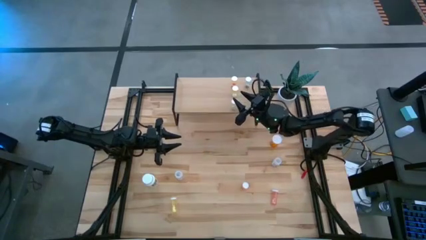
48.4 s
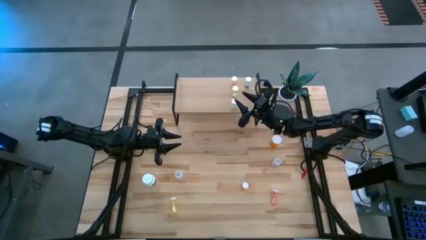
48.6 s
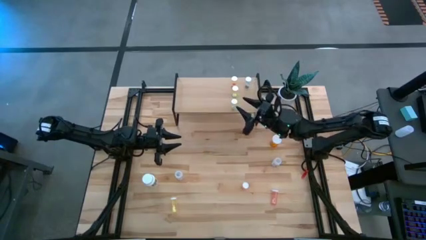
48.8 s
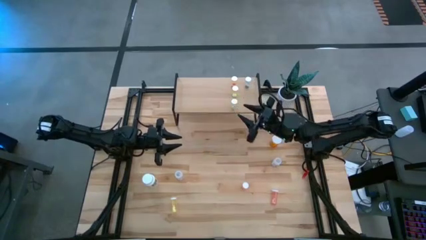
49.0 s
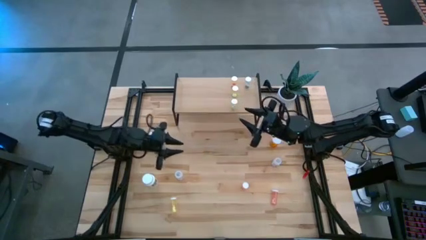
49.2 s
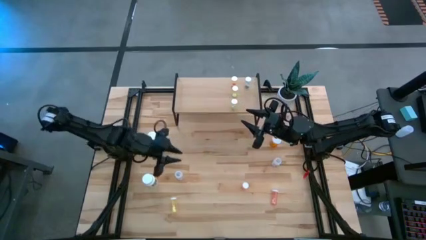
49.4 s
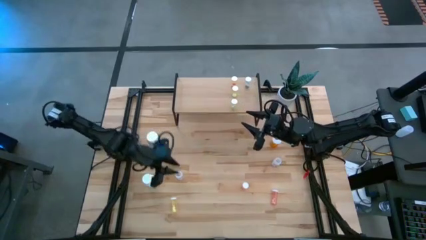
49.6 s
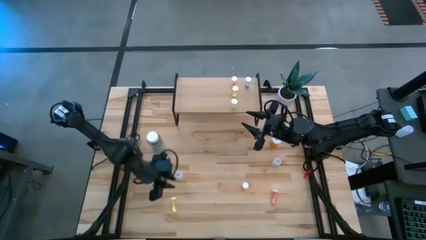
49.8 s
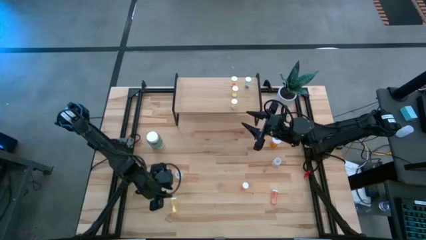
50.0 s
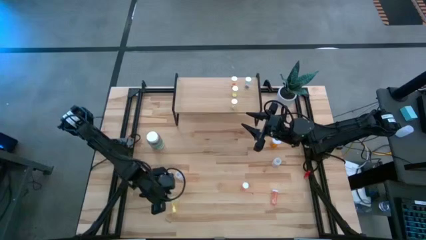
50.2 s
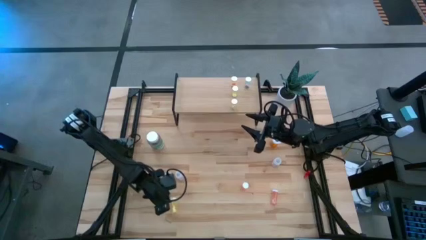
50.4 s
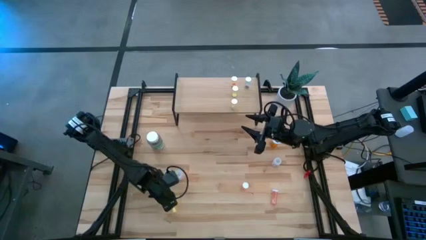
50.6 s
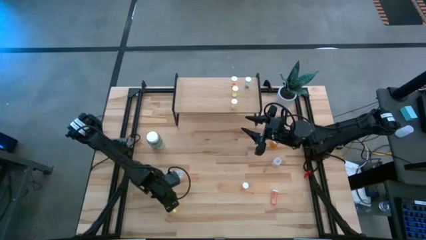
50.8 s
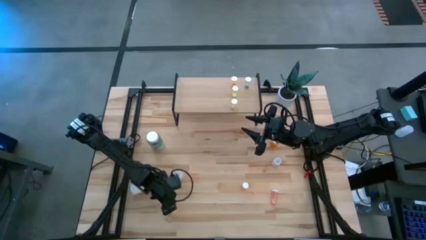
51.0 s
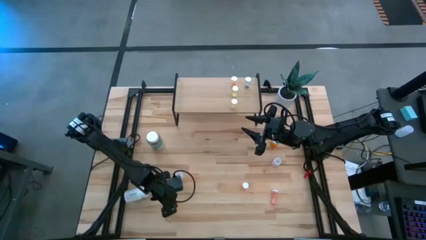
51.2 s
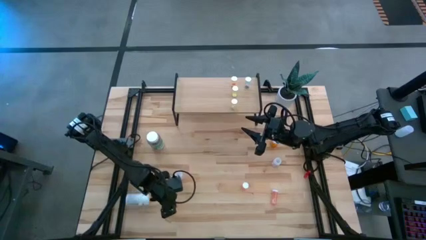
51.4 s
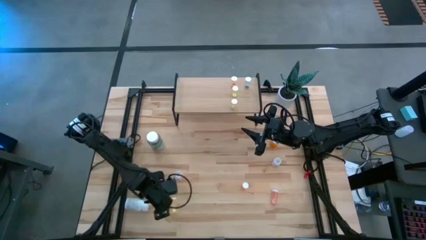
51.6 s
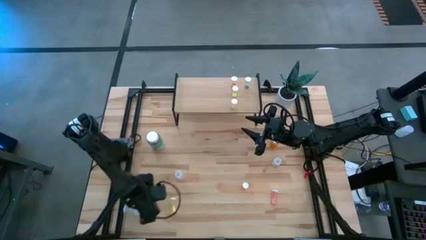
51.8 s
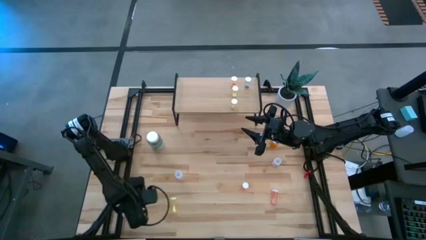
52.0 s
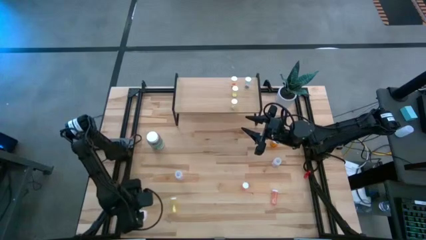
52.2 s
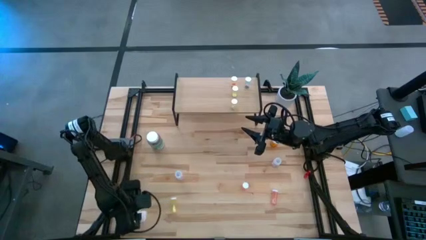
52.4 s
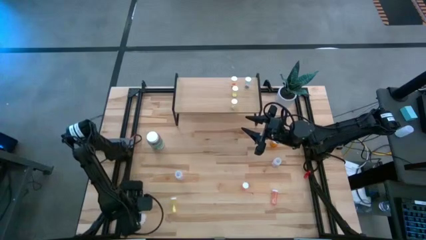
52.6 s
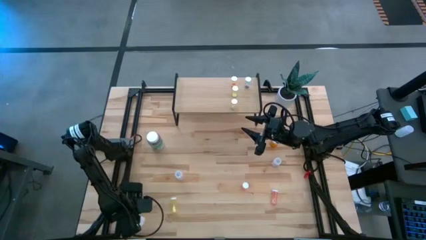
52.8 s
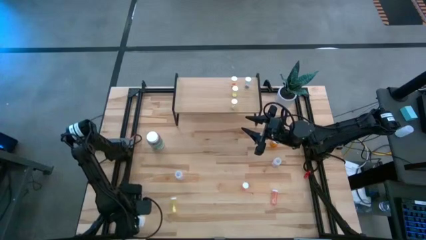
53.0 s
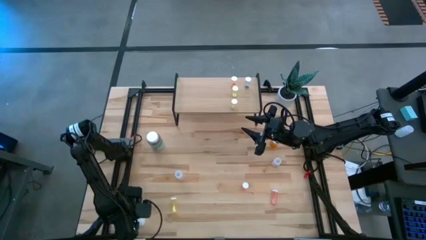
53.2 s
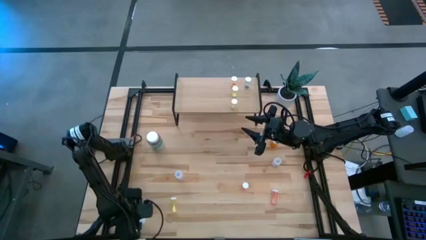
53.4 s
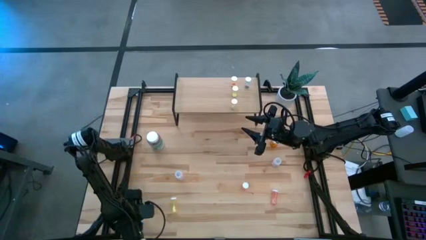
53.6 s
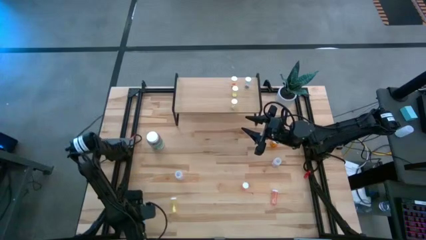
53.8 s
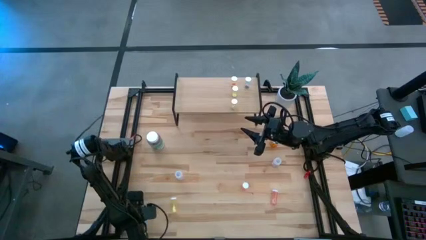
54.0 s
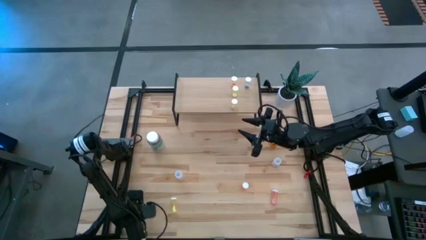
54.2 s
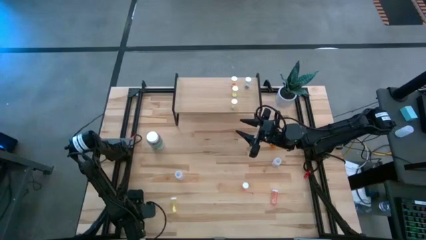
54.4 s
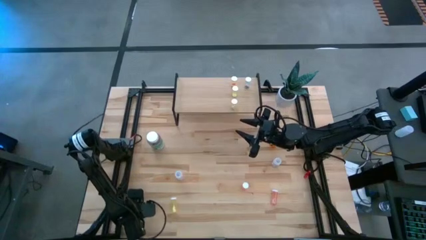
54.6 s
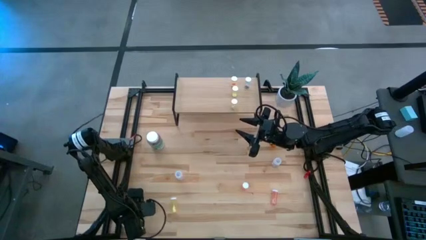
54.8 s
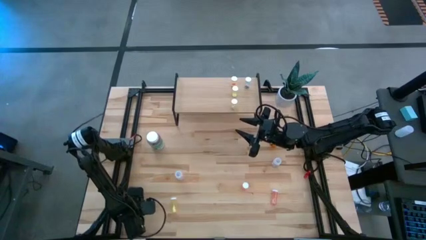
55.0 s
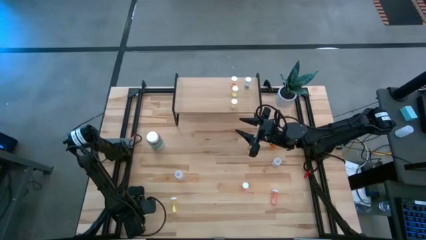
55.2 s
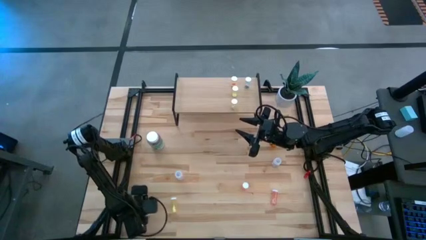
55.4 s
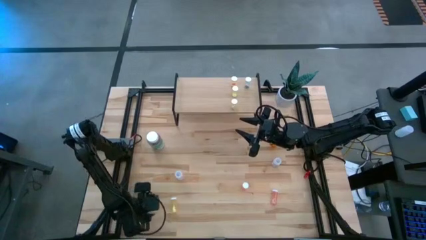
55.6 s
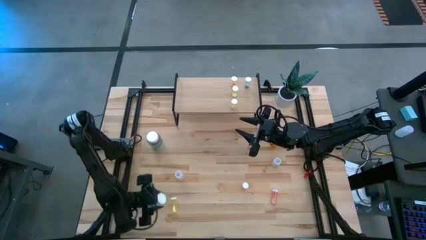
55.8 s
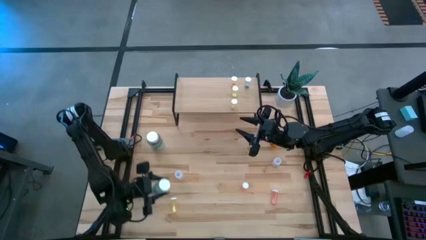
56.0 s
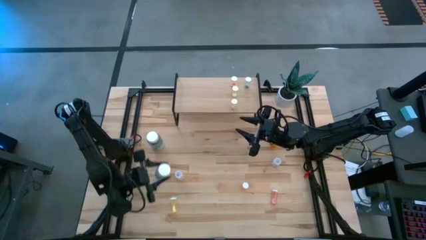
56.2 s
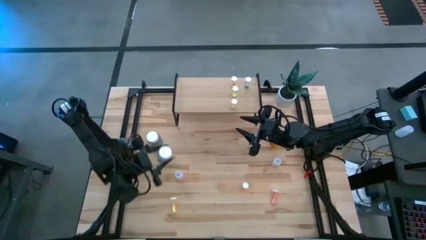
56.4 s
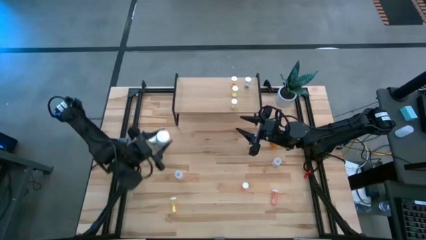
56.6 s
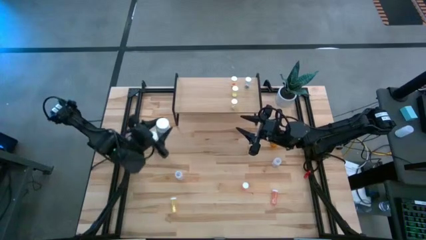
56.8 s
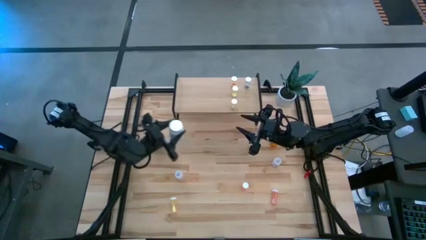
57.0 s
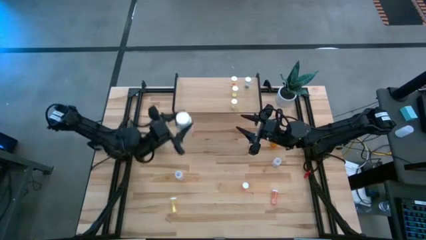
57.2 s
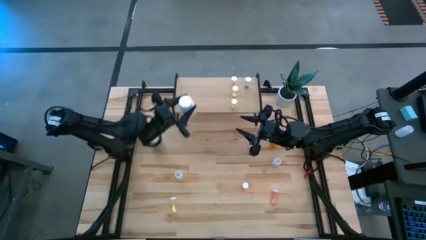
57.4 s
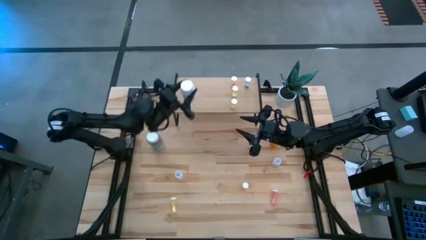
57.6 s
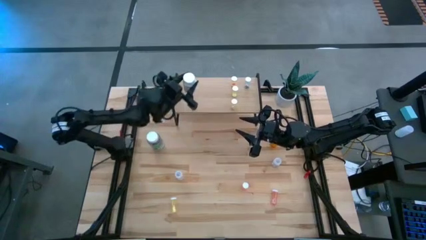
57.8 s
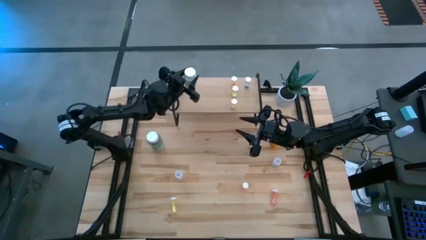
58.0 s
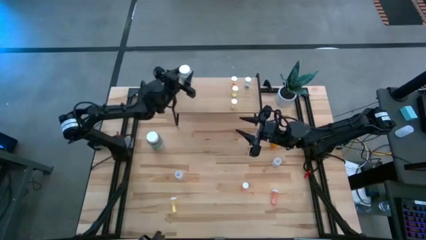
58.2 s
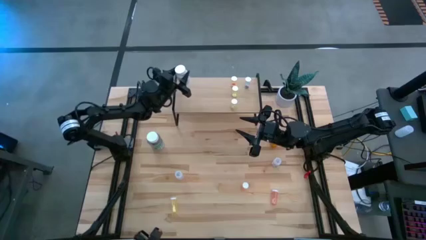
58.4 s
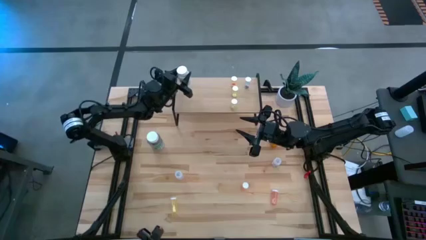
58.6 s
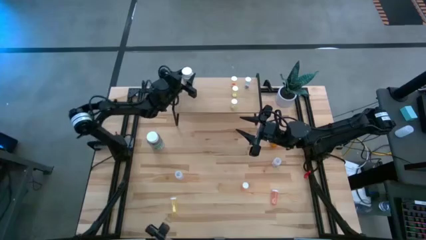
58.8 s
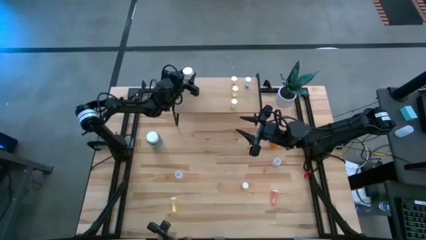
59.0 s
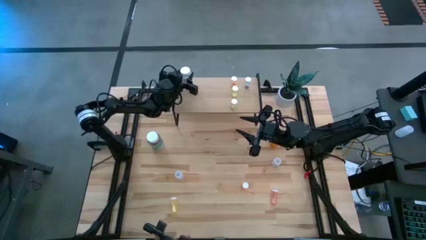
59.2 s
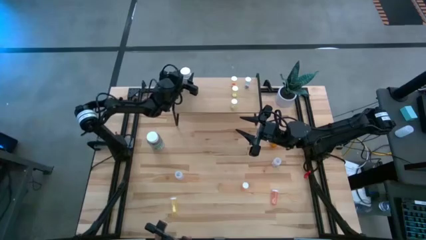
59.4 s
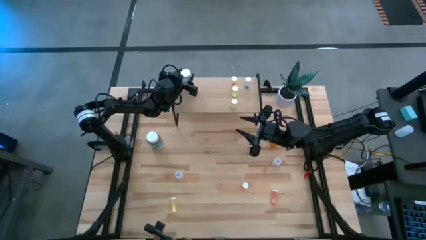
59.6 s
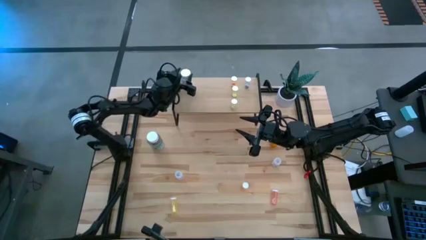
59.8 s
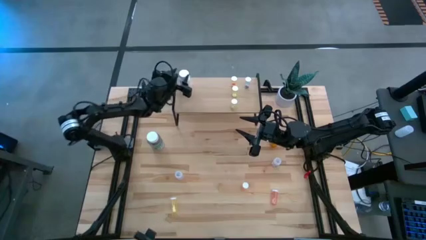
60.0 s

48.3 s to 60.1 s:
Task: Pick and place medicine bottles onto shelf by color
Put the white pill bottle on the shelf
